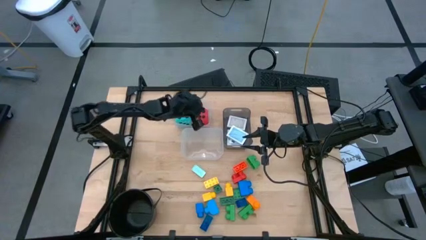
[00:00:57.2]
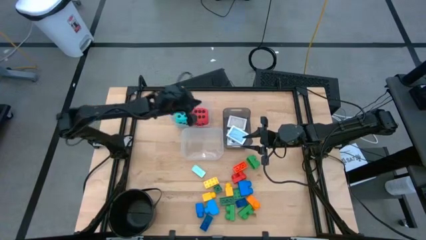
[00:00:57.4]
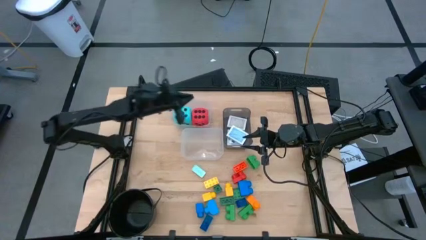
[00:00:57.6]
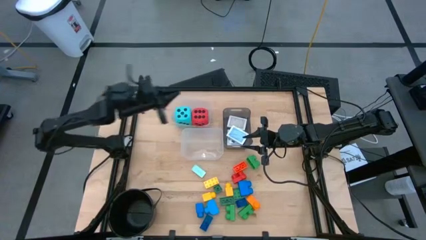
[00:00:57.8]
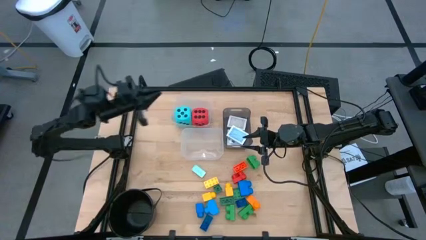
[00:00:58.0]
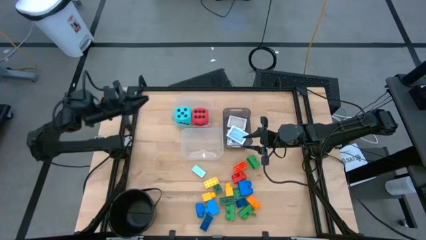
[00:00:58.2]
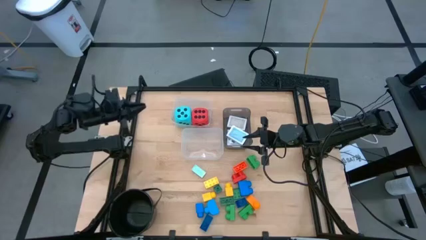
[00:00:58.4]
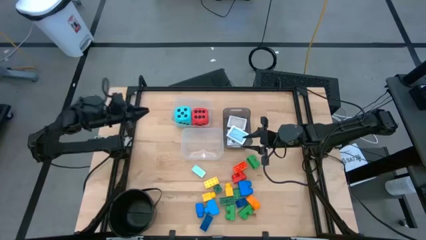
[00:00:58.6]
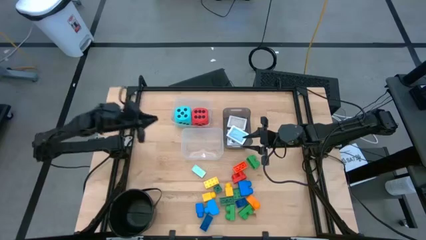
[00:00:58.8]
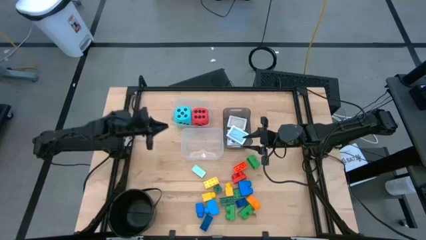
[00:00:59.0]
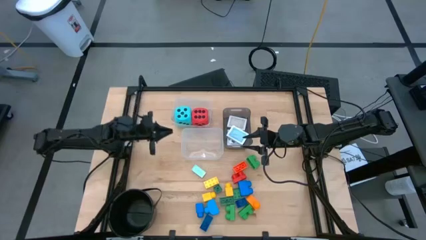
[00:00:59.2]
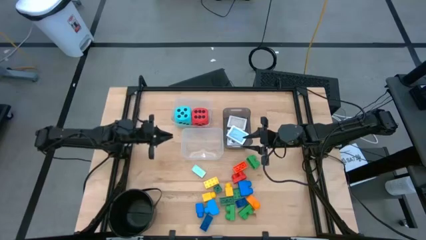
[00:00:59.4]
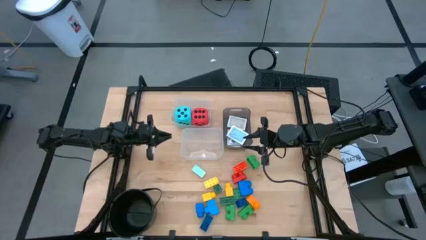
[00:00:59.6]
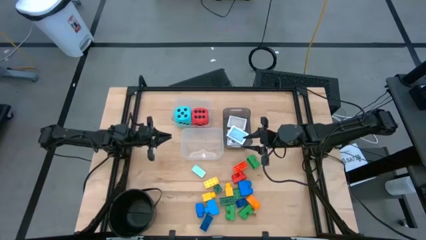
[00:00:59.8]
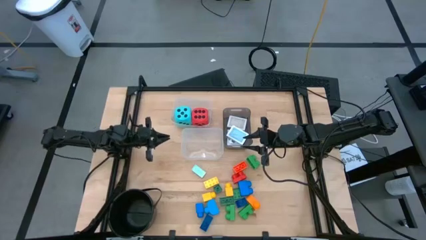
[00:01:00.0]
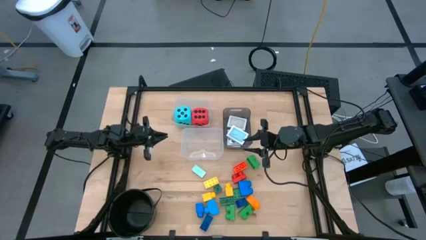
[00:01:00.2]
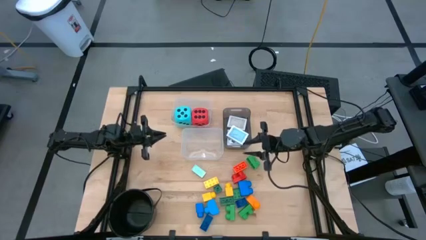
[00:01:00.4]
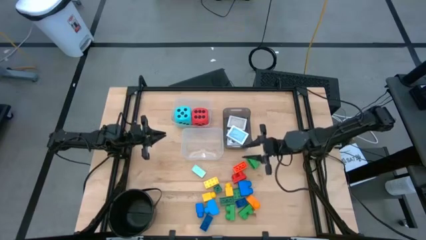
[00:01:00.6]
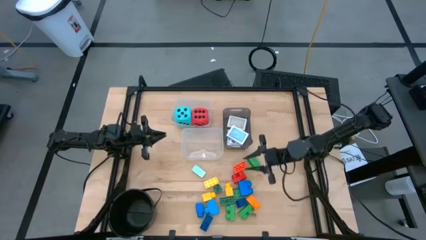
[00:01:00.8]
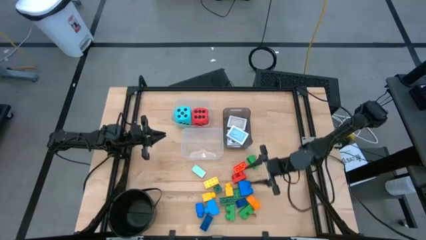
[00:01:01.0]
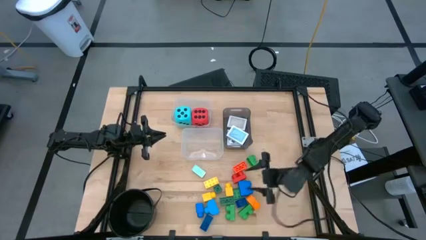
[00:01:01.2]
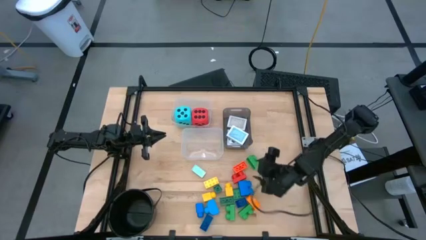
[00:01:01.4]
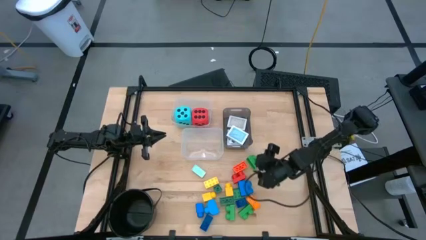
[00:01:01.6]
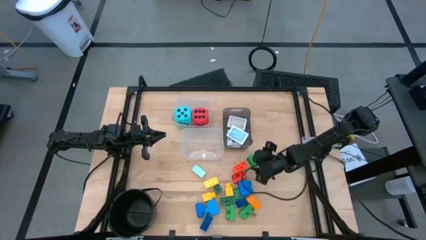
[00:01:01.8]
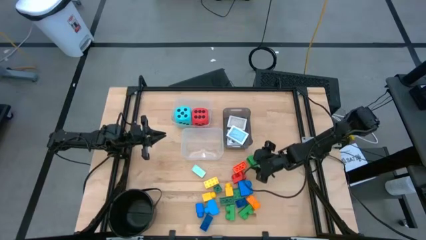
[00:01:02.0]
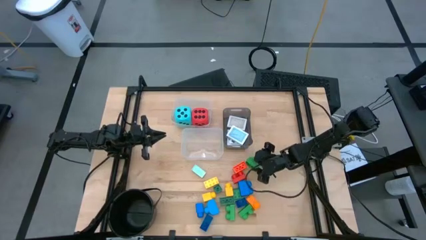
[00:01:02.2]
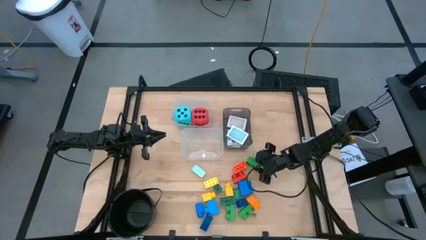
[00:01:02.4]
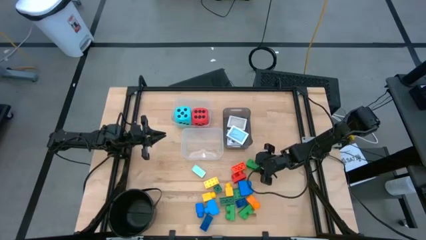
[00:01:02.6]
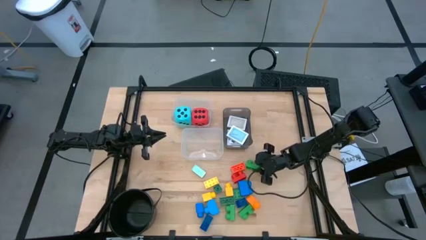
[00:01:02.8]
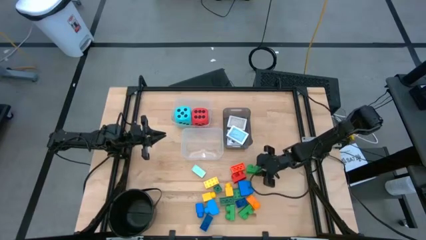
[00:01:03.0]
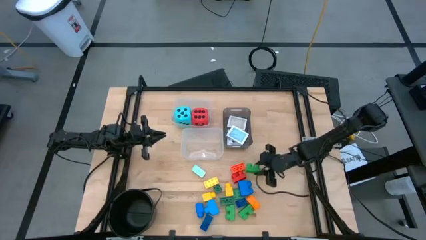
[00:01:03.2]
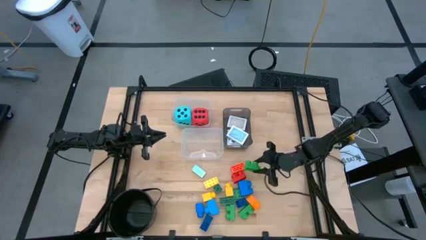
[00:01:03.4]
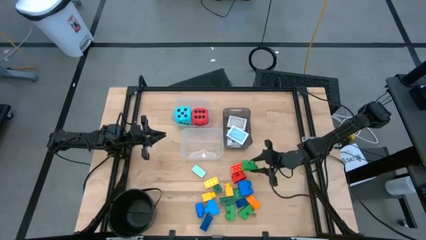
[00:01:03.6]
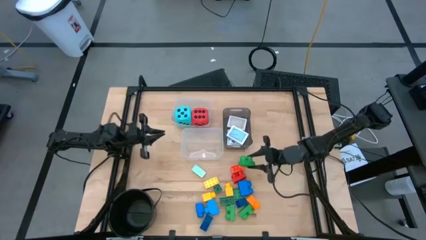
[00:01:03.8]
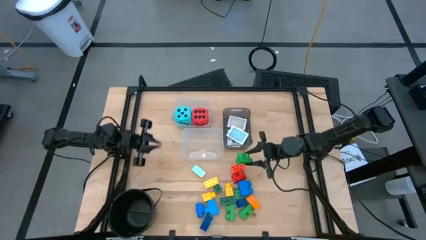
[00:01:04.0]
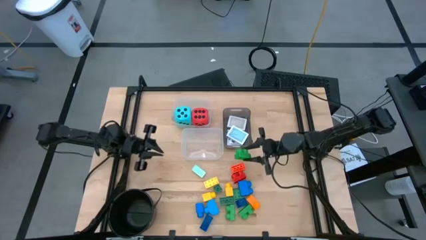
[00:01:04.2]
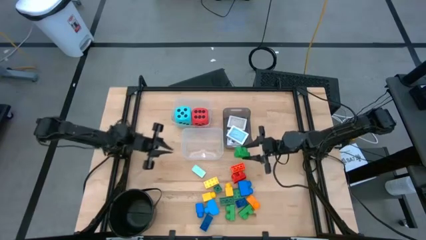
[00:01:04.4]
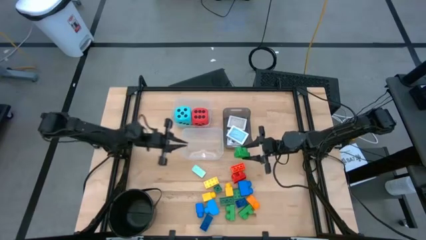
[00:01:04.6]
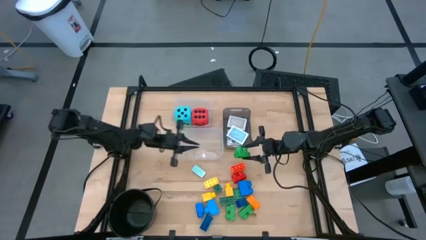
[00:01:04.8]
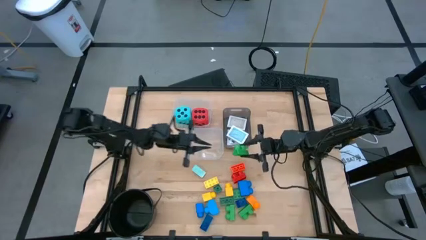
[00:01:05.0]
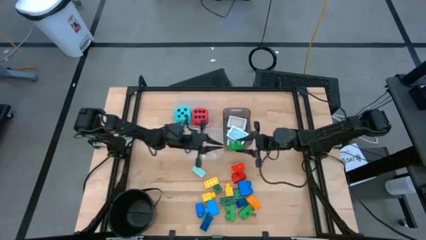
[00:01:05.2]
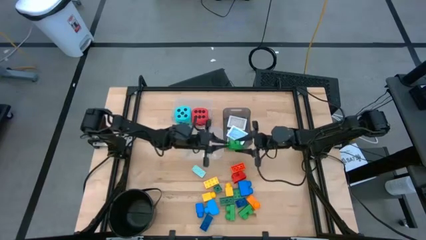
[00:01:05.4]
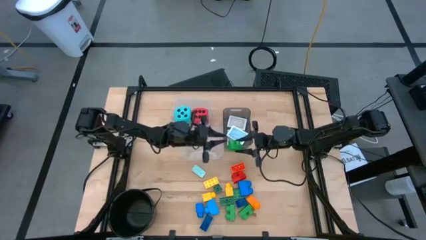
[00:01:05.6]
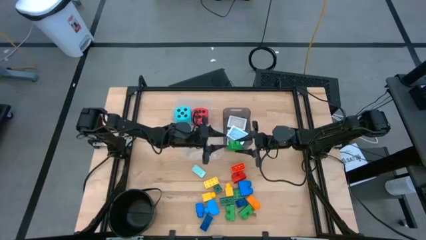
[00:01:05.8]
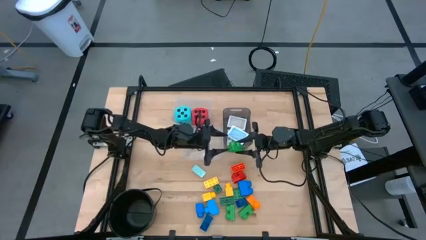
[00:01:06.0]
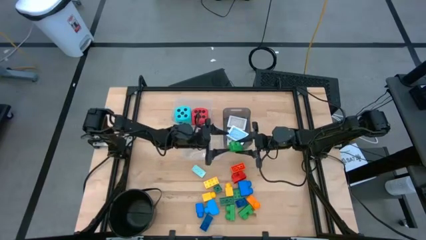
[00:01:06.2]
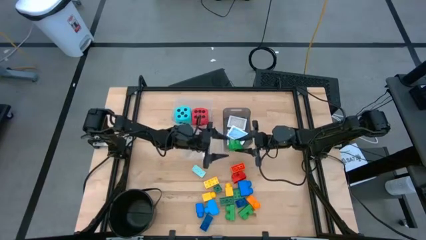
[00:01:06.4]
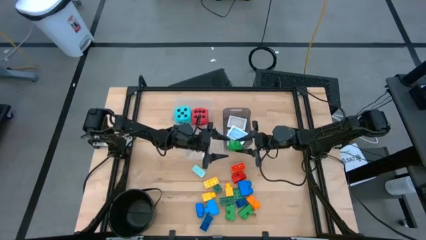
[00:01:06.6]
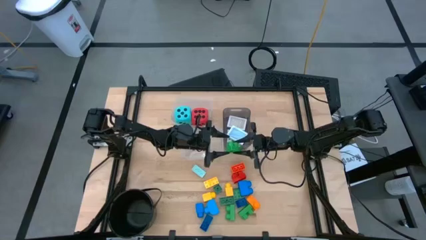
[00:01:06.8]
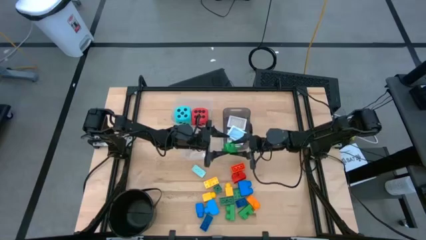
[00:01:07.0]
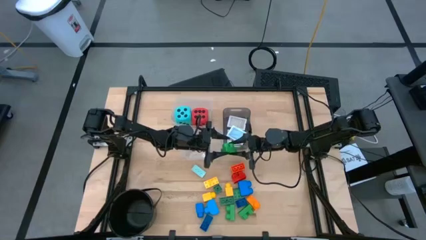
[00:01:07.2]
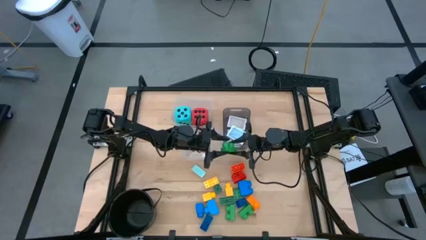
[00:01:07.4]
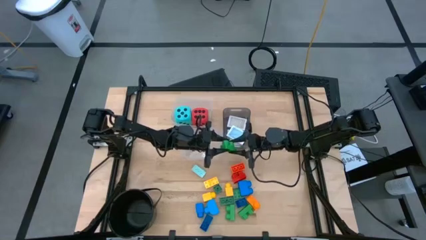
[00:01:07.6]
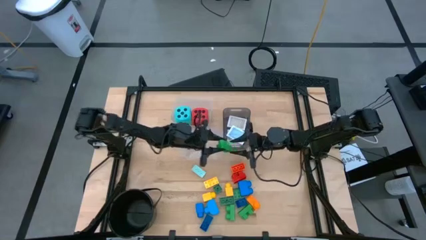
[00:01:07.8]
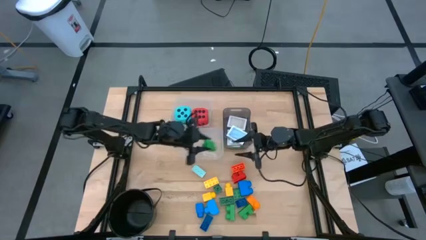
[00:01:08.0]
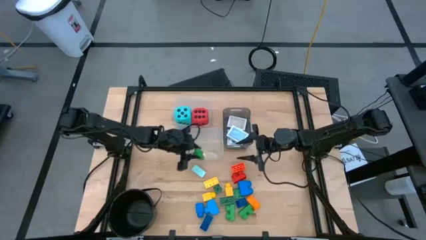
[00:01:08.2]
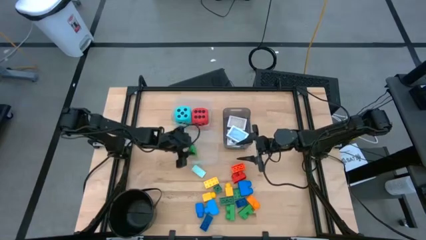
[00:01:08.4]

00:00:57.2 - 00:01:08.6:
Task: Pick & Place Toys
Put the green game piece into the bottom transparent bin

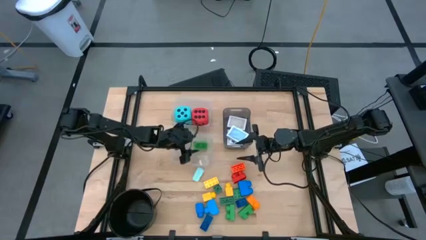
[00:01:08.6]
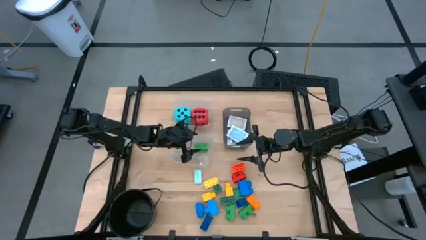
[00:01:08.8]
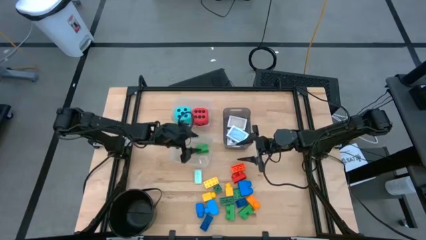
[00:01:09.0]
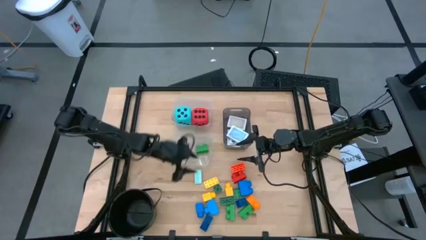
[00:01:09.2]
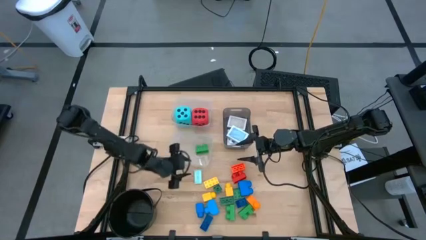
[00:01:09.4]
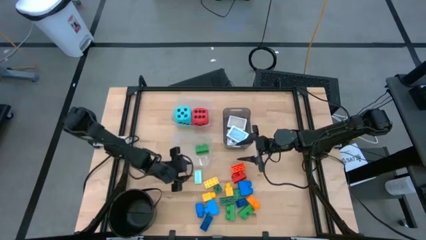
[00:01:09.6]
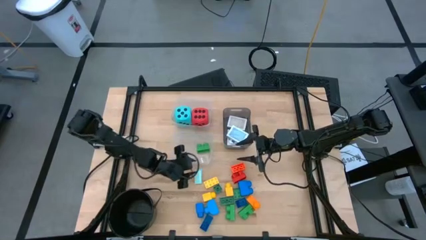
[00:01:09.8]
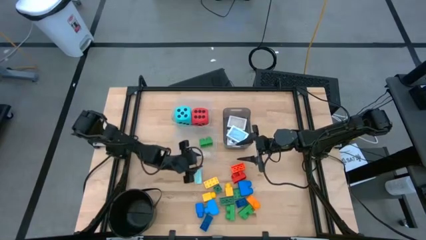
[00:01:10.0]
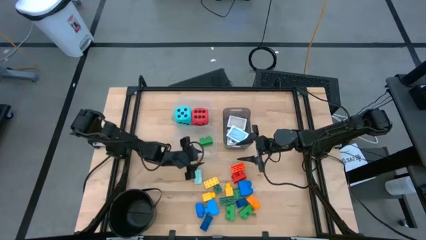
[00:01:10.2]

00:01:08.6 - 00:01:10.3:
Adjust the bottom transparent bin on the table

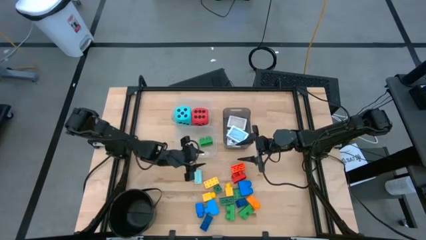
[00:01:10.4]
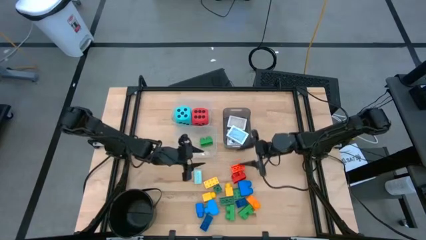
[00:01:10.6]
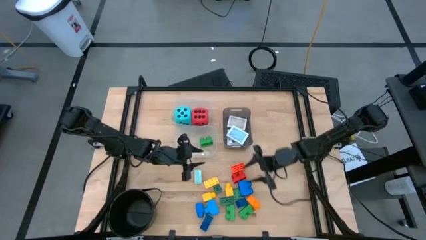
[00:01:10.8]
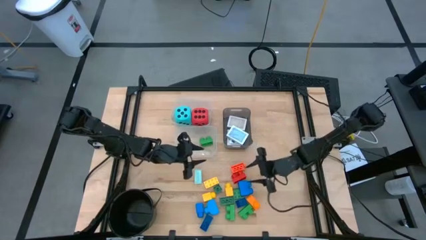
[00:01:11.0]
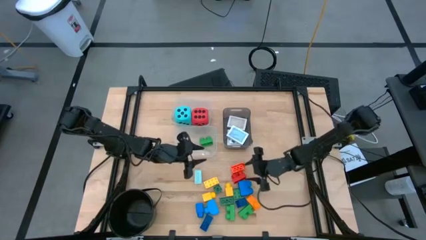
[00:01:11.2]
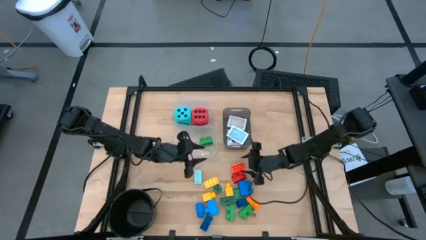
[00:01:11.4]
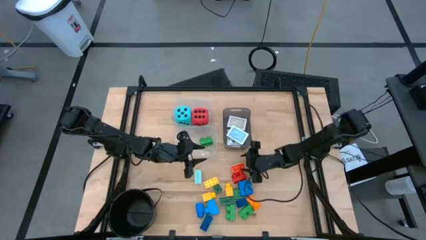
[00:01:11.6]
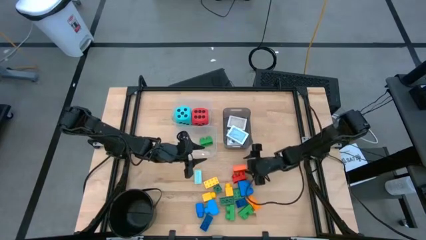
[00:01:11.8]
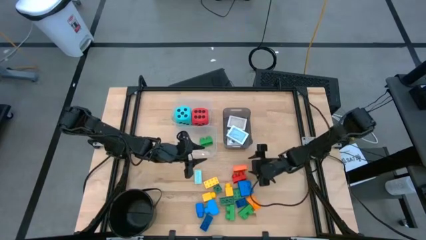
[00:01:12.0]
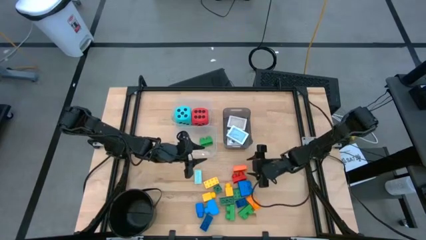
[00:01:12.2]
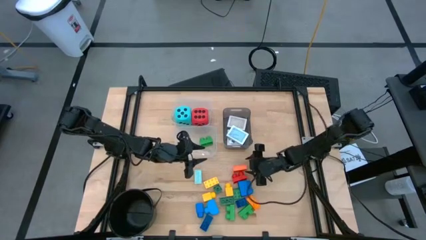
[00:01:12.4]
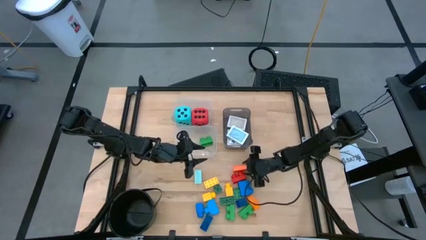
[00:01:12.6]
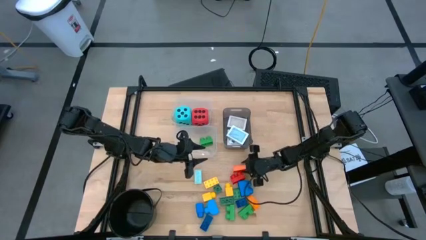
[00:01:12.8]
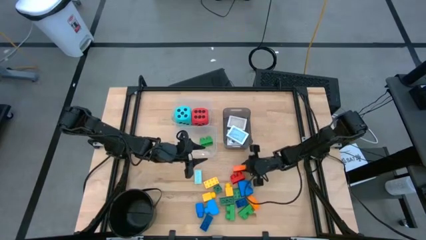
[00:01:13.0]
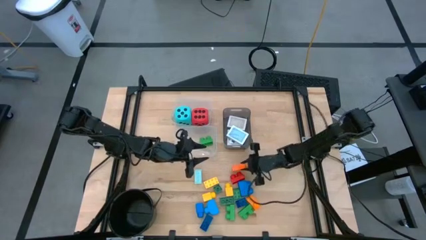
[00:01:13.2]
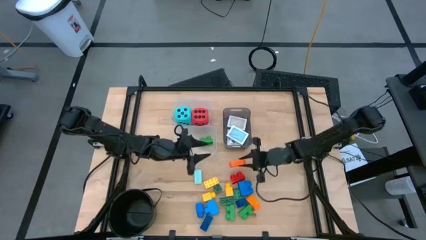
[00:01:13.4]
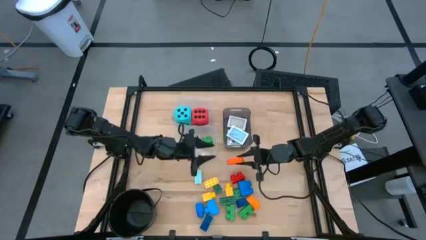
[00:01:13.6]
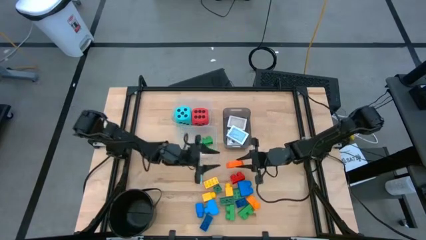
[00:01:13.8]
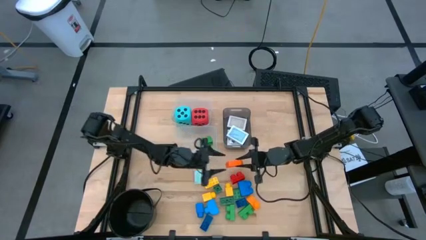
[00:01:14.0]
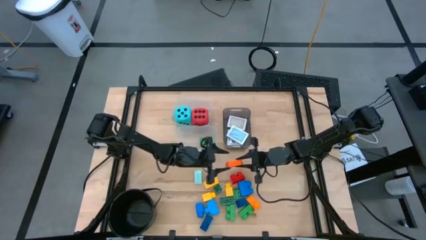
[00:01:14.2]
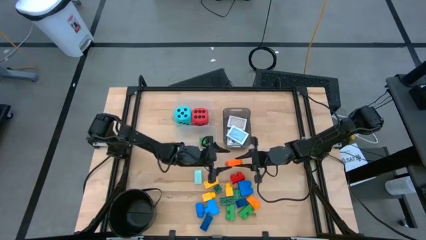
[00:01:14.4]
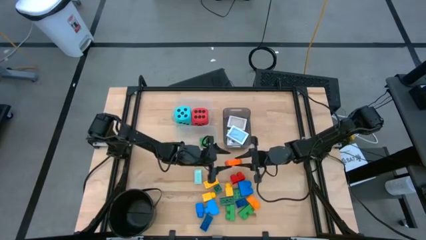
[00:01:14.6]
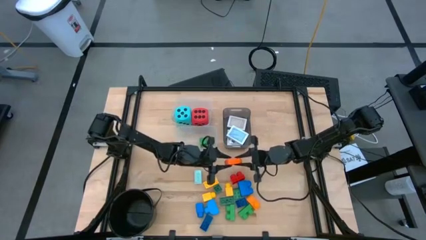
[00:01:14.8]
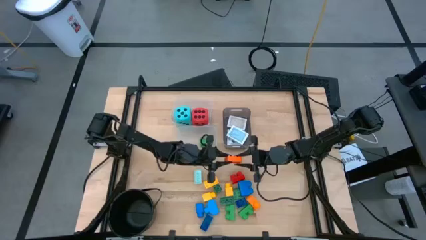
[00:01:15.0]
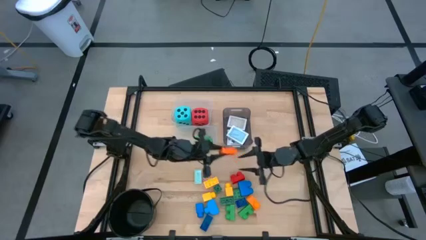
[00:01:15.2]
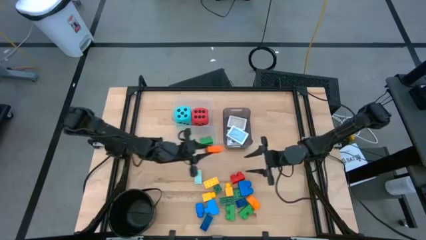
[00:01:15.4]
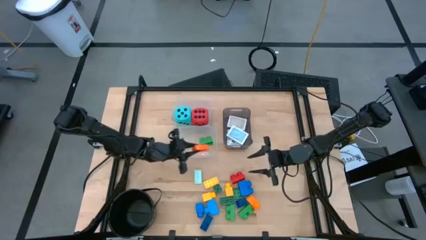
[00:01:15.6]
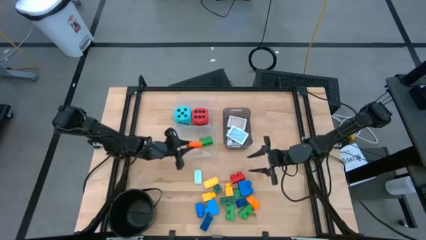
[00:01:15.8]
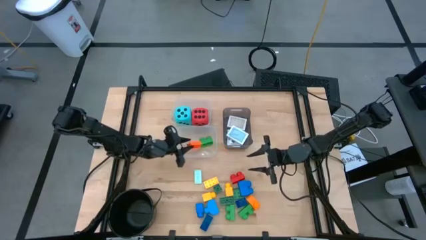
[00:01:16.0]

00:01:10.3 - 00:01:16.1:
Put the orange game piece into the bottom transparent bin
